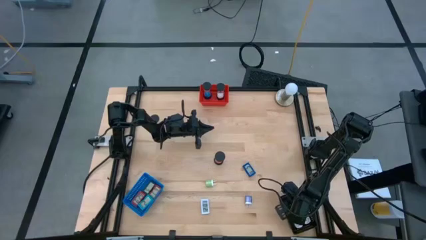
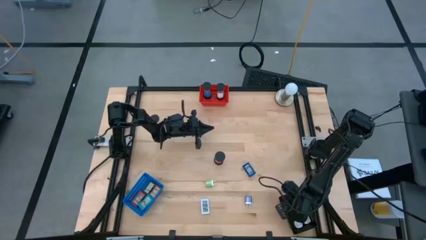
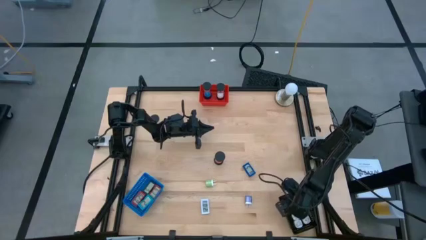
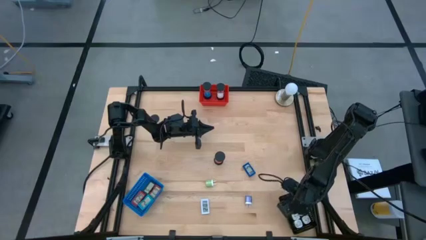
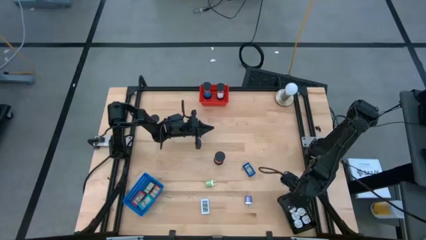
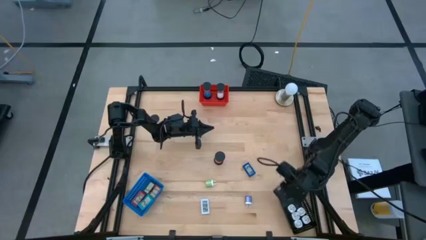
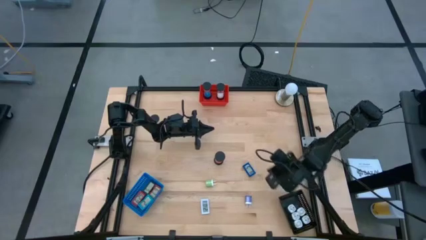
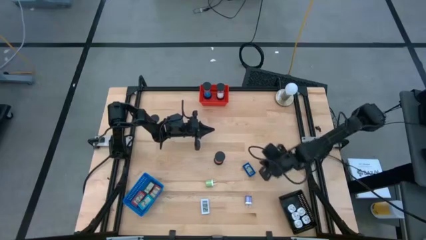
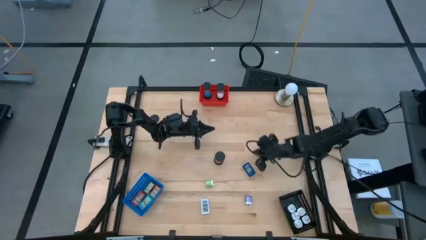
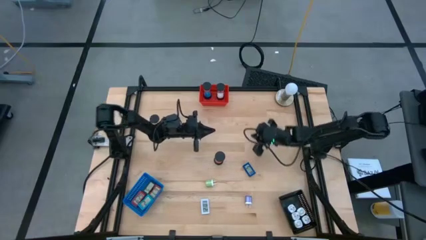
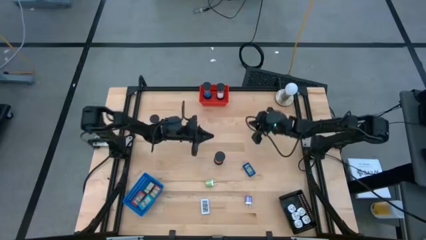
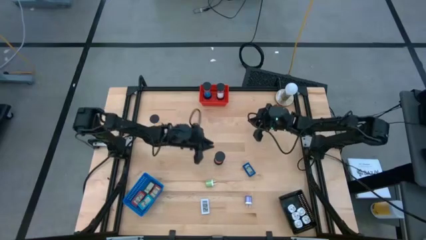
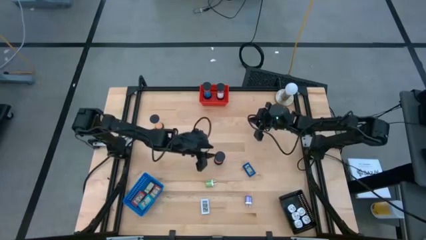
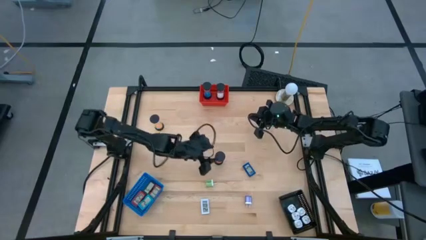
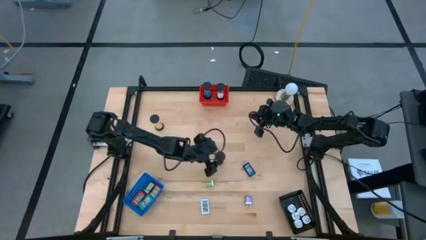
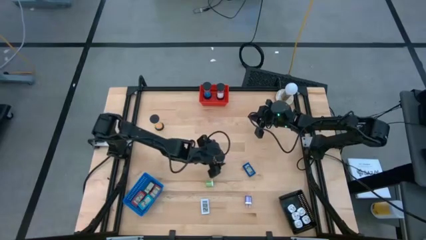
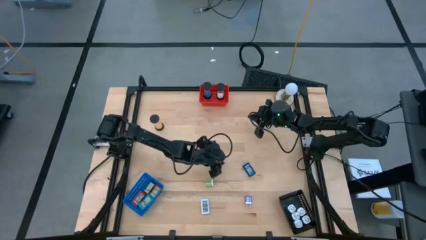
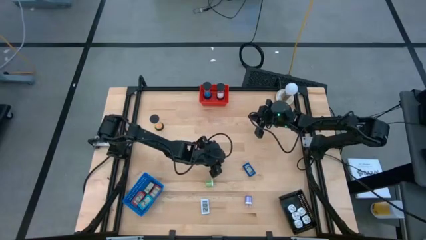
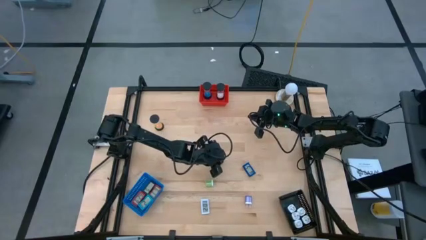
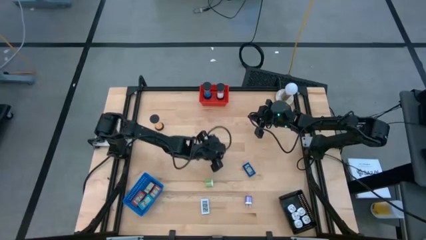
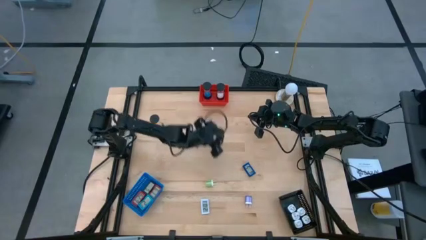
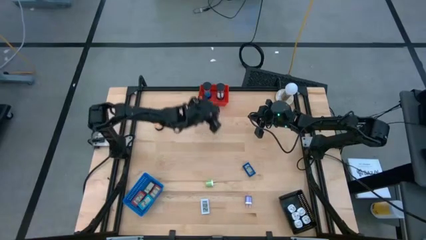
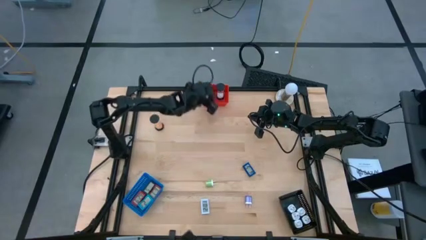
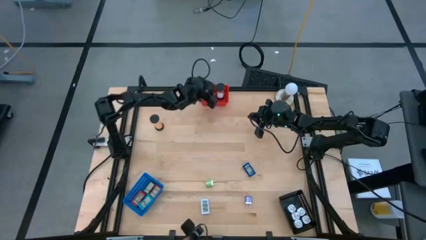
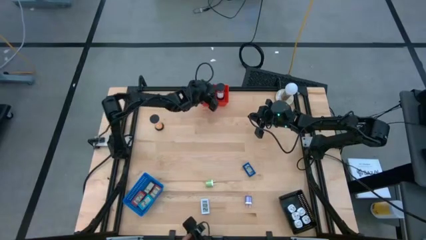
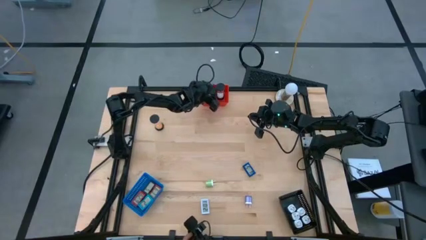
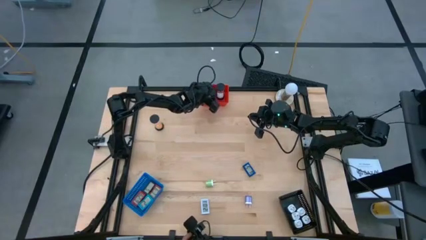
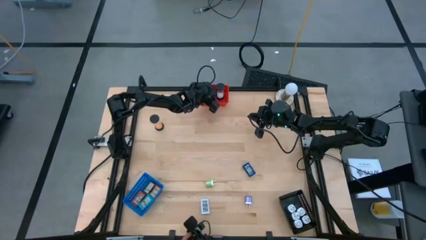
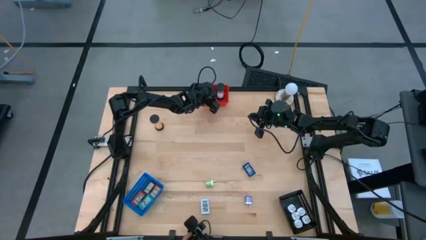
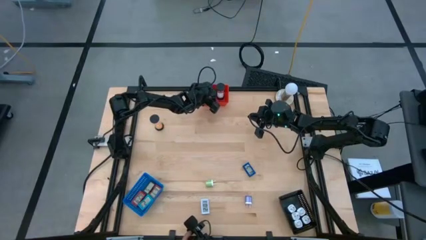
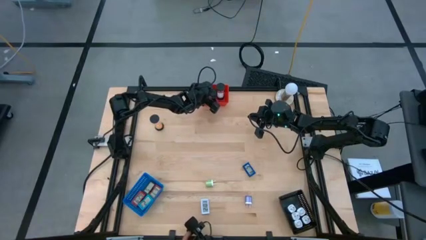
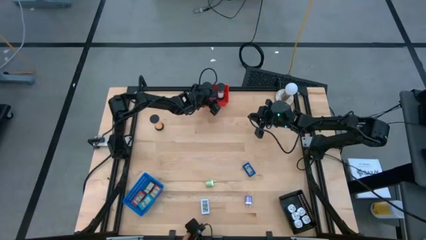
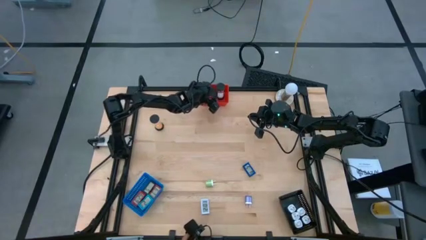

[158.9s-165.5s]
Task: Pick & Place Office items
Put the red hourglass into the red bin

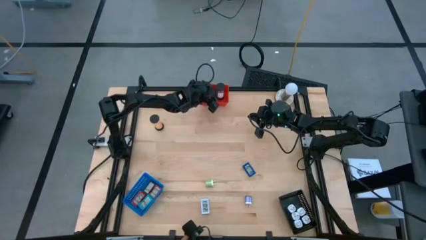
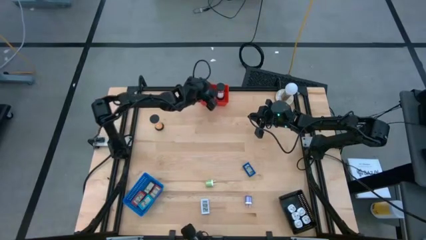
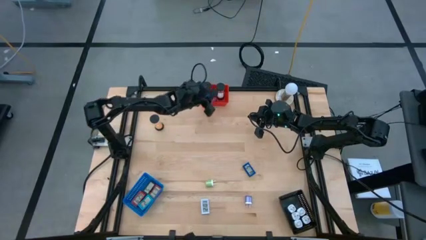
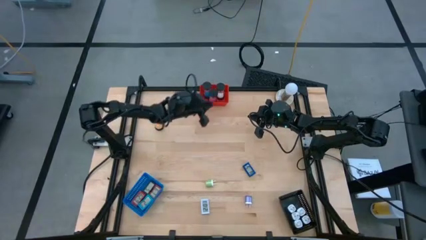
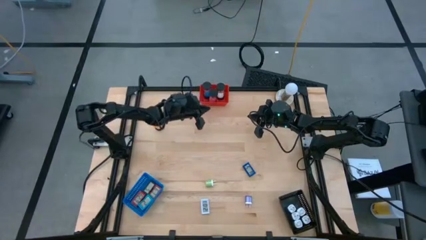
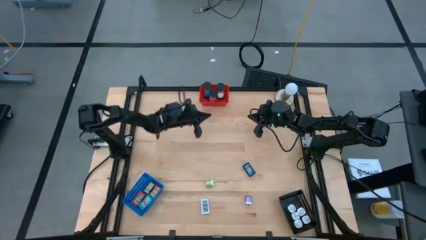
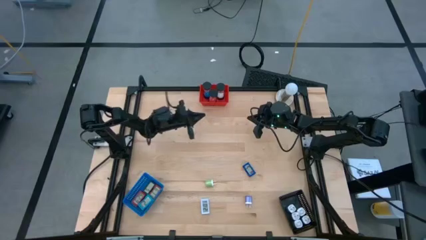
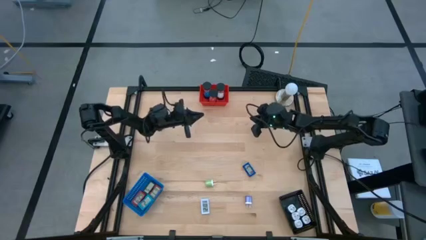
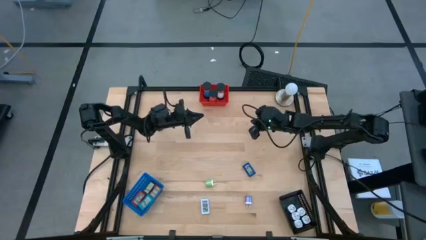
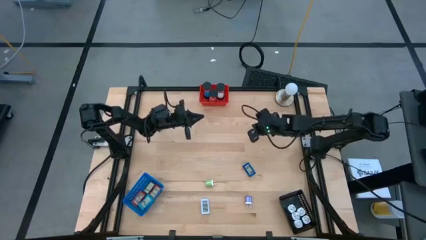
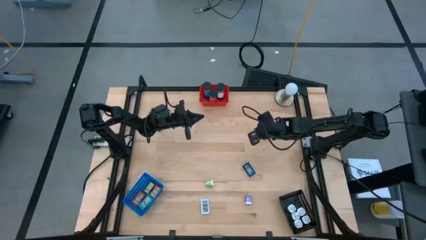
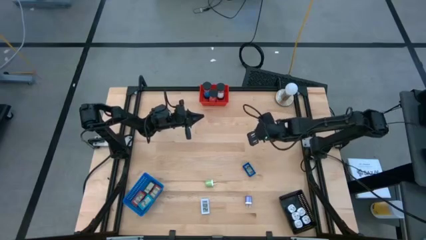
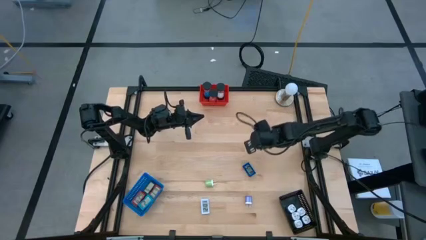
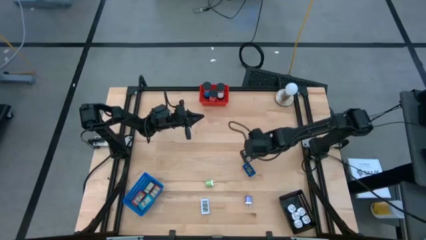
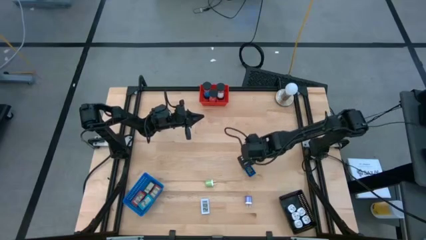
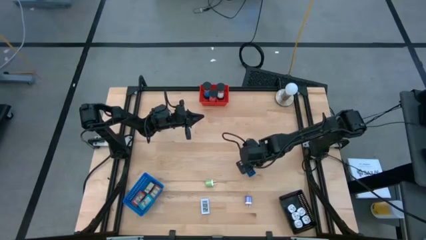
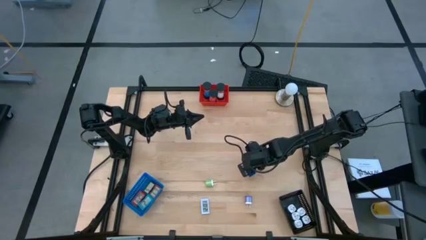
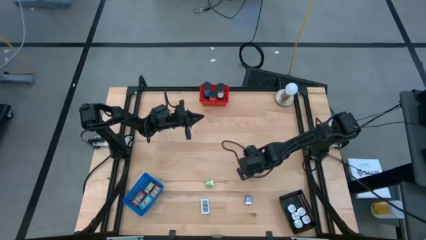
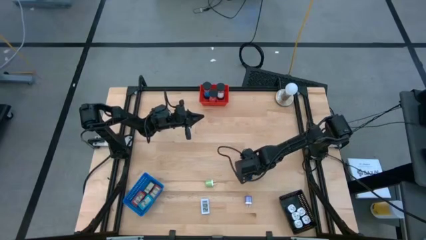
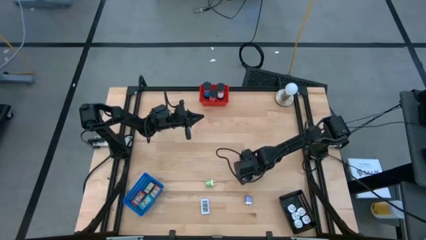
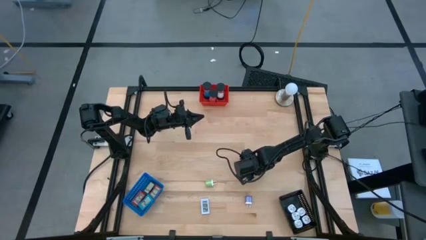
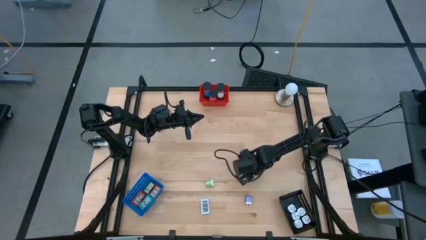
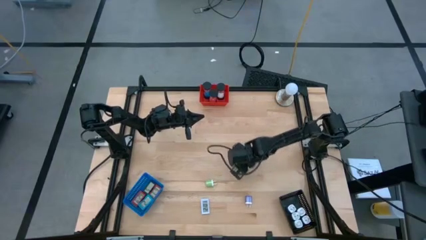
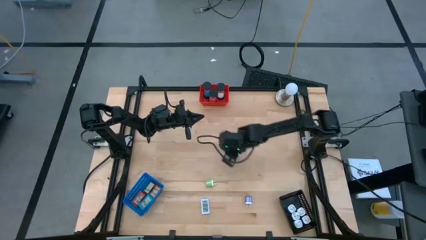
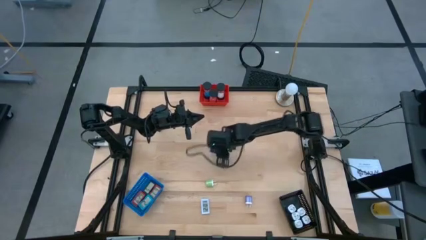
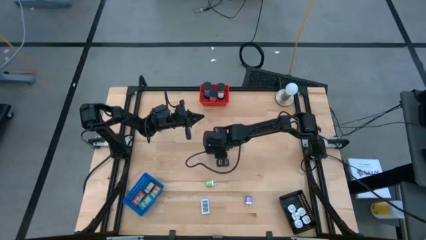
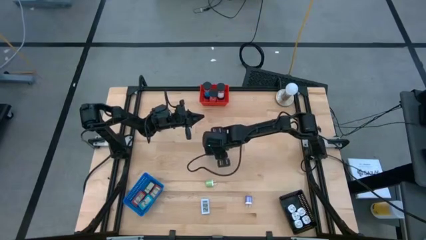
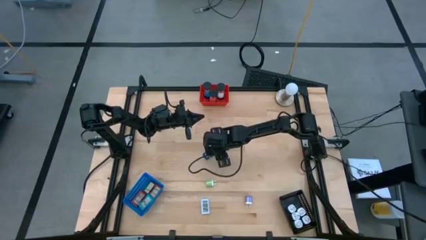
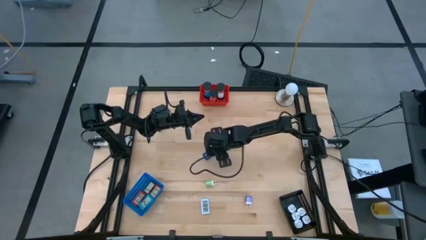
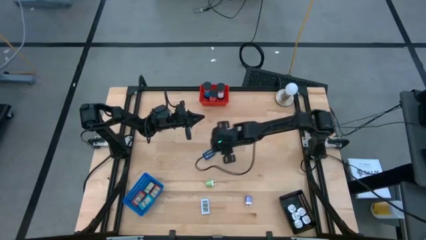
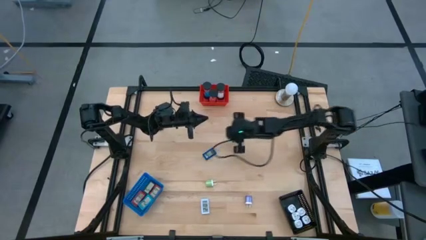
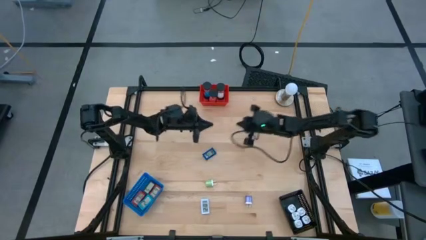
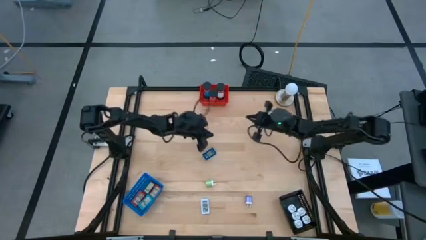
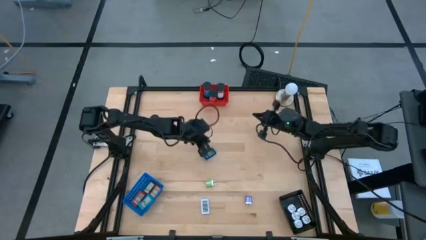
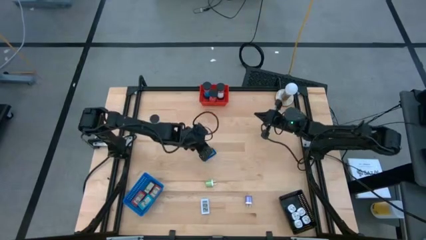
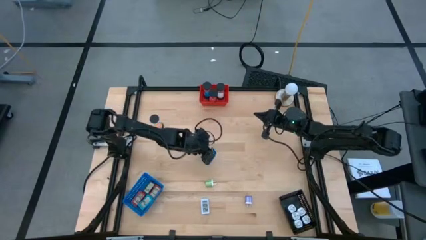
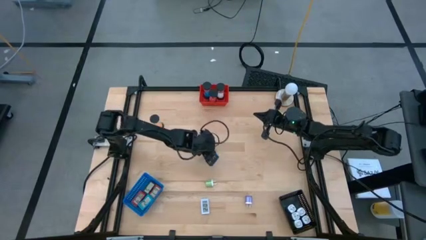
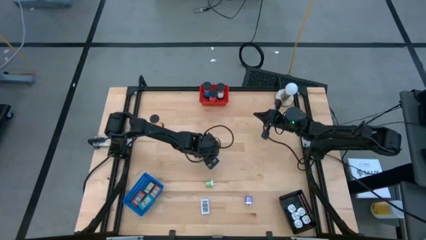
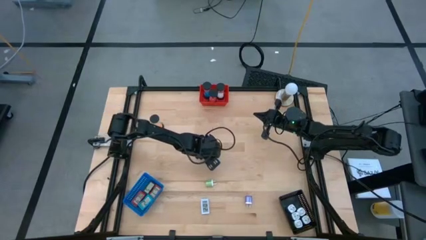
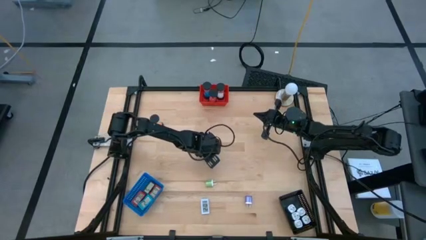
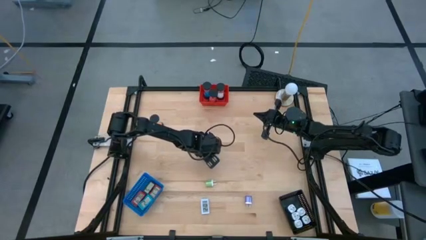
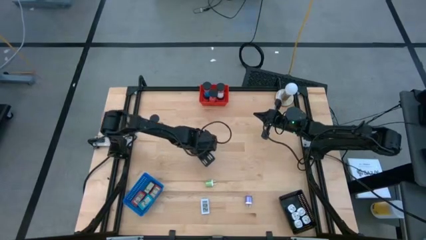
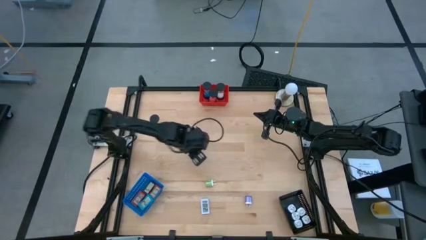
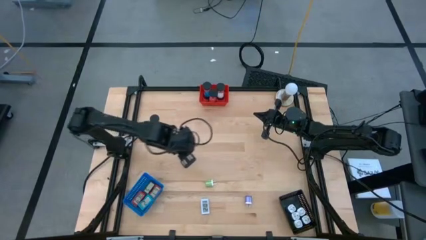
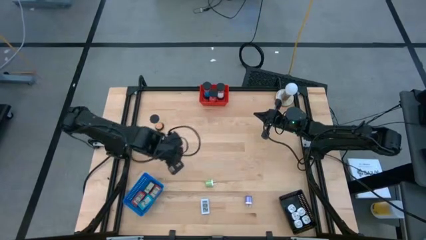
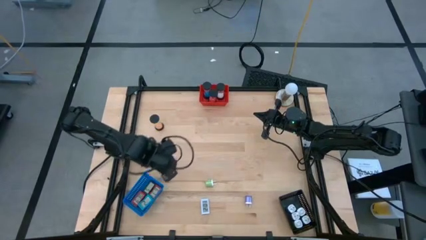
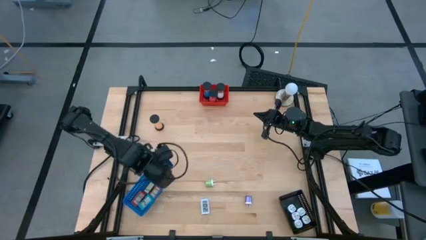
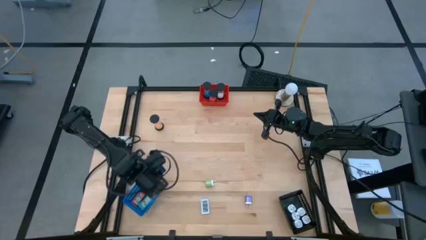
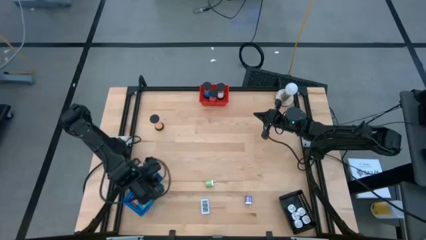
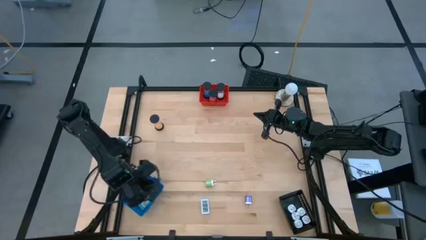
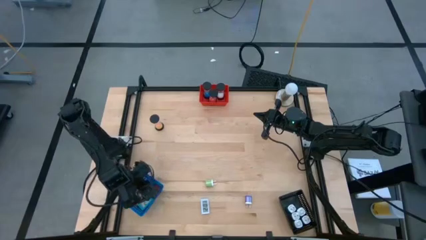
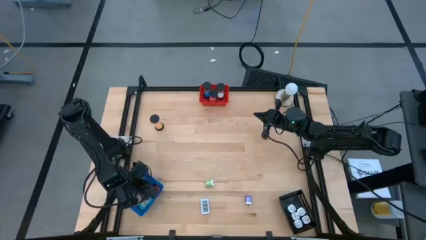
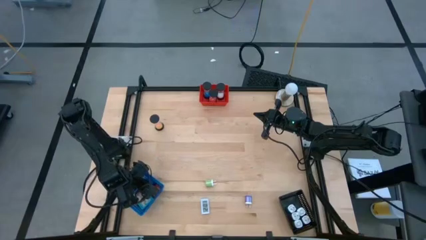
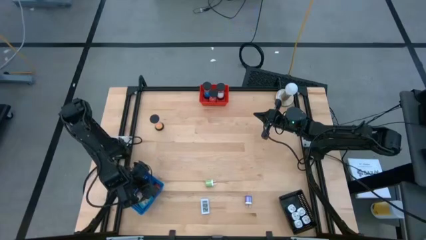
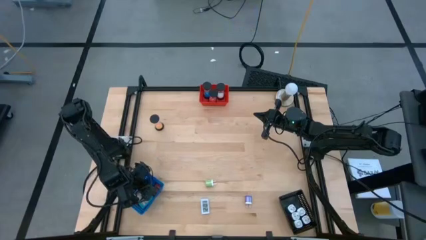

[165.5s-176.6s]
Put the blue digital timer into the blue bin
